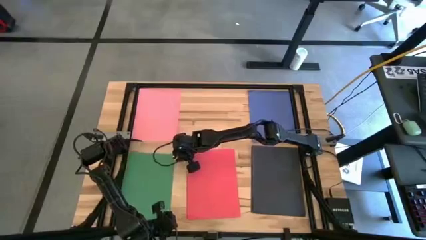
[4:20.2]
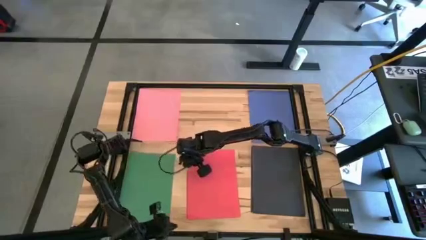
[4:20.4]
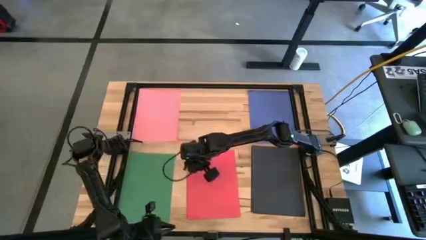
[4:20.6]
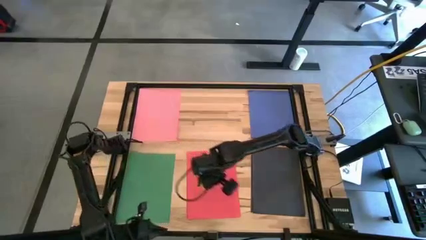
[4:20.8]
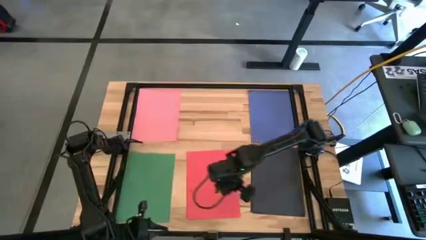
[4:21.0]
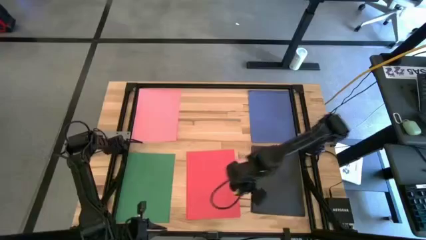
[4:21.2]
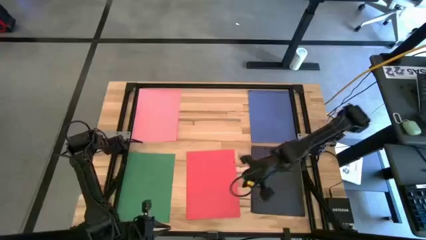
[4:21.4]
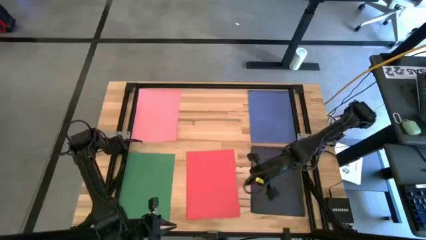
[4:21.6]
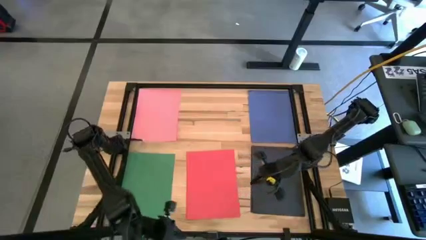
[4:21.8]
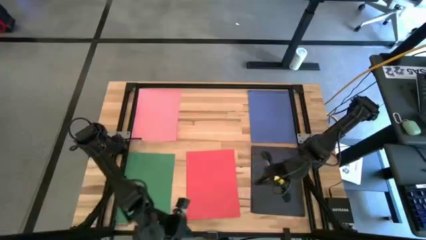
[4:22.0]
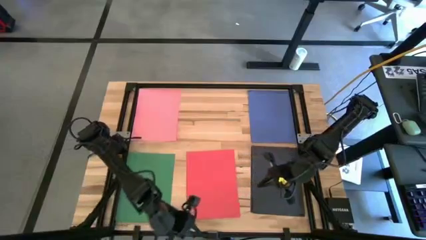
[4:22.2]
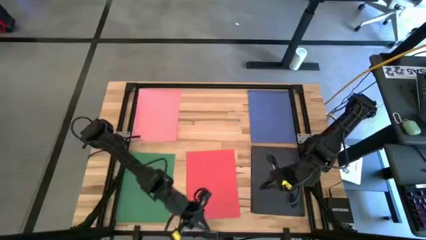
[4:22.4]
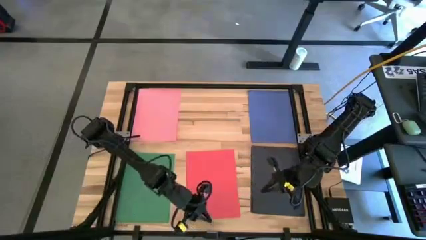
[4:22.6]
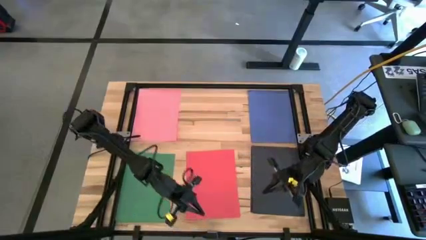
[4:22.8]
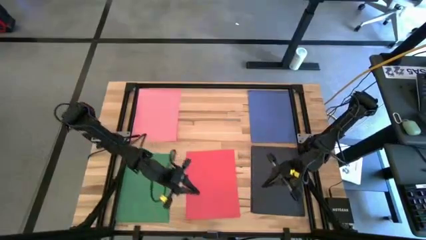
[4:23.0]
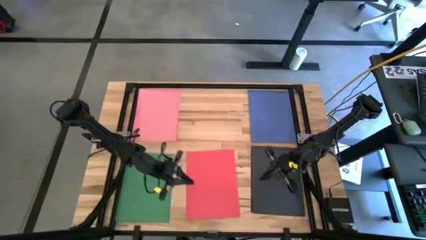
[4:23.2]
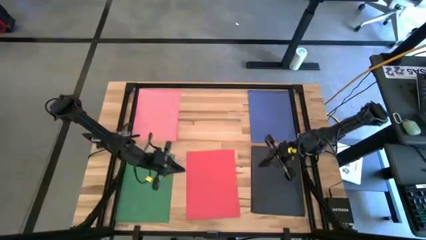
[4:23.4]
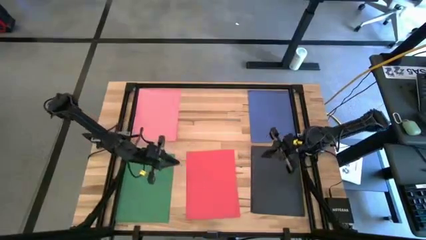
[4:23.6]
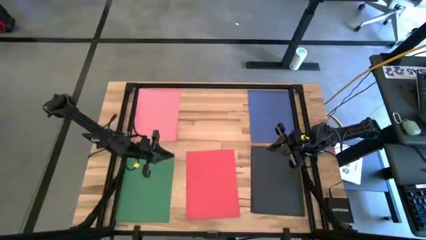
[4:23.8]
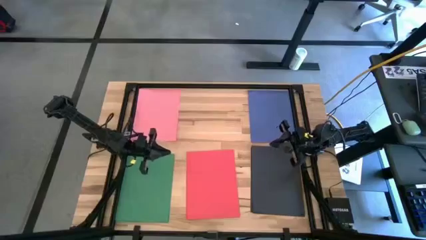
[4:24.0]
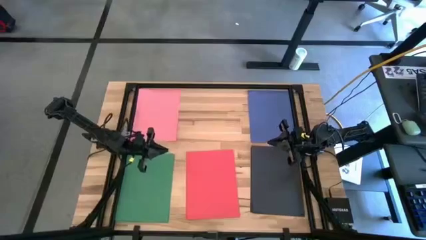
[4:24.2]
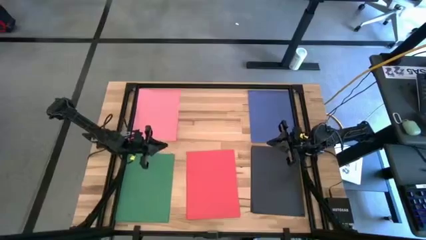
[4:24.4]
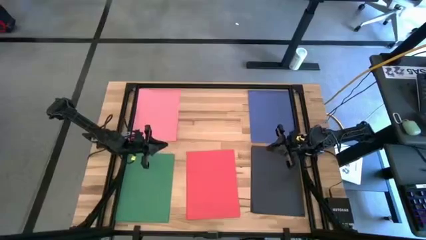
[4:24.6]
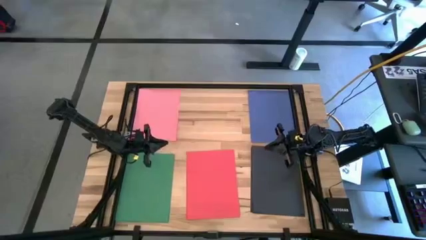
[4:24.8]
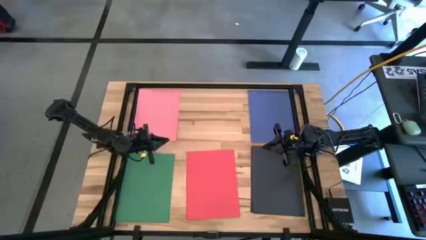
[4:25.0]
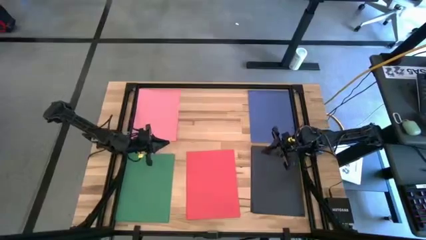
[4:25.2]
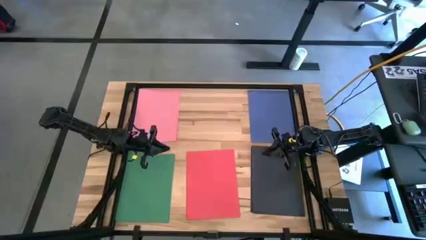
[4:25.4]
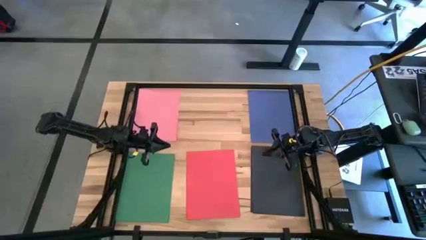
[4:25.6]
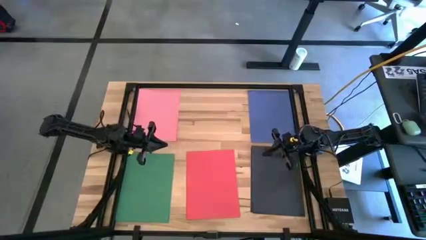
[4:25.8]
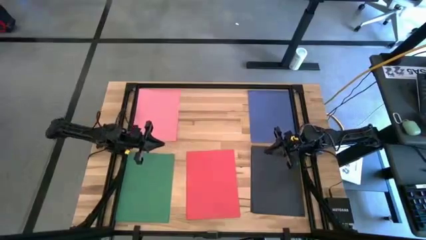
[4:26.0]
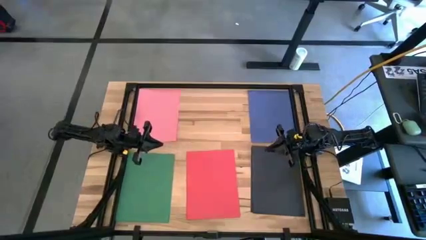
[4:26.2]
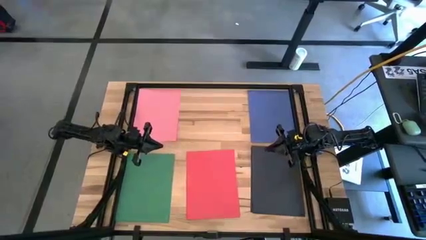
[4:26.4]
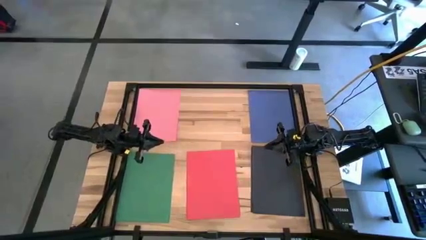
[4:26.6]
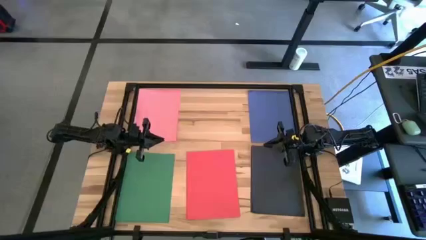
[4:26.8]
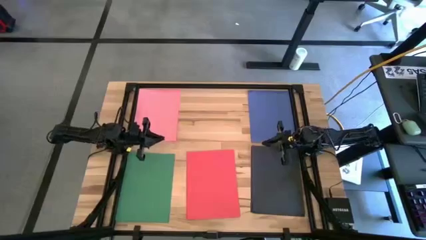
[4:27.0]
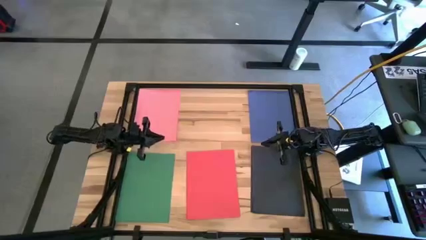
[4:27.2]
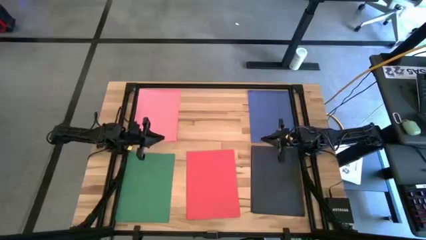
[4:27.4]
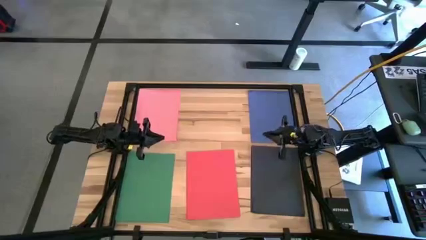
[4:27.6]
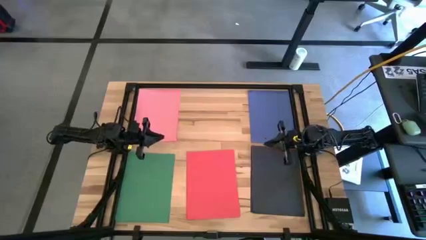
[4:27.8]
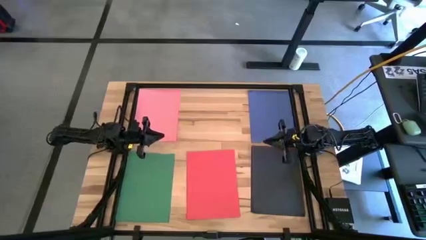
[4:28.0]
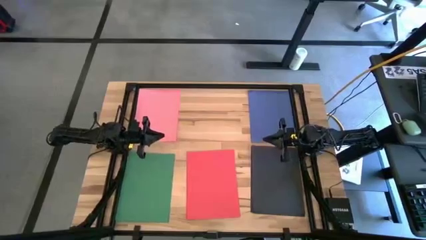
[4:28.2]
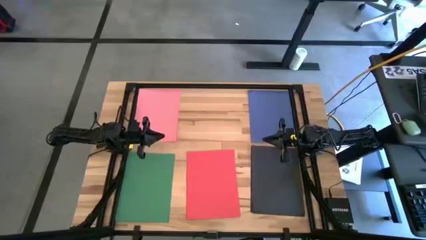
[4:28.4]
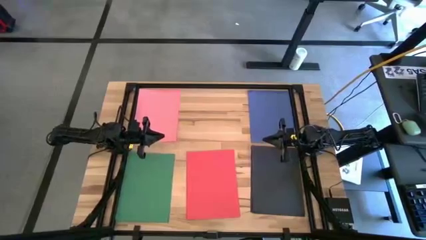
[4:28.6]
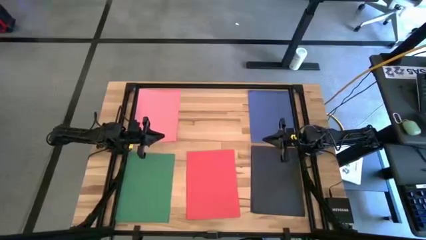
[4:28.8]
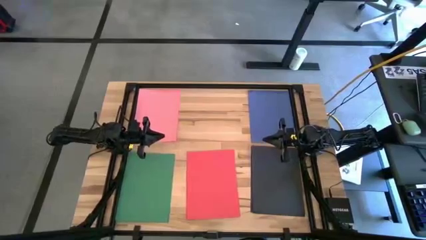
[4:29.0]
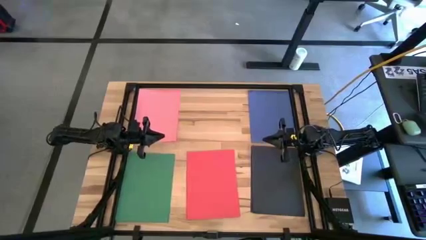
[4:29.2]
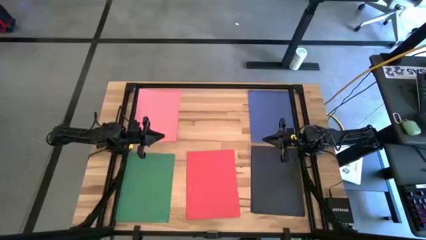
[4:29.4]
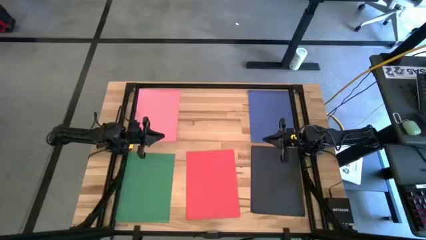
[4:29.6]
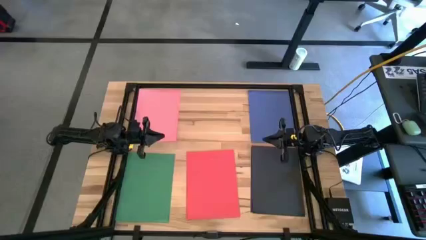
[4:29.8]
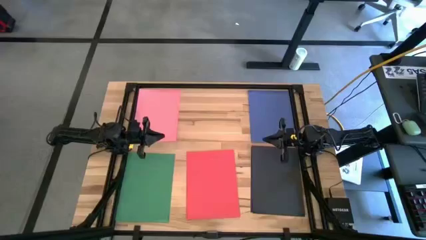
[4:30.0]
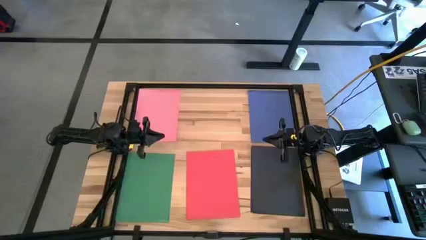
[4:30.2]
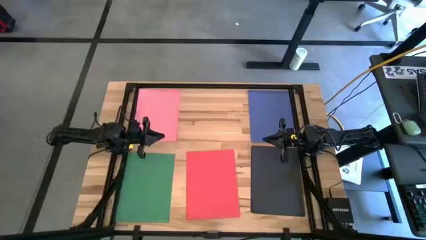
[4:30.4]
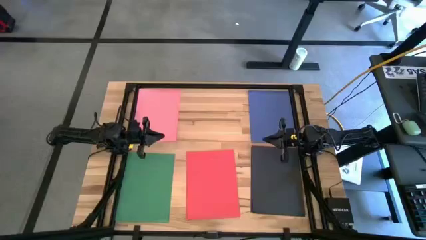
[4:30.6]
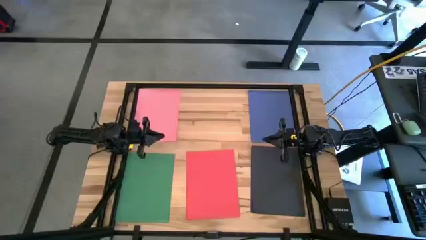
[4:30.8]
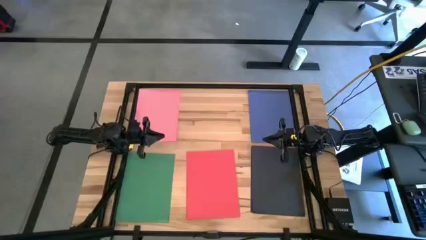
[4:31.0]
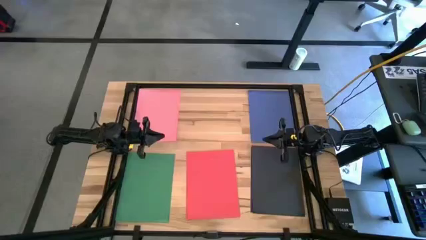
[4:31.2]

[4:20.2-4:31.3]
Task: Organize paper
Return to Home Position

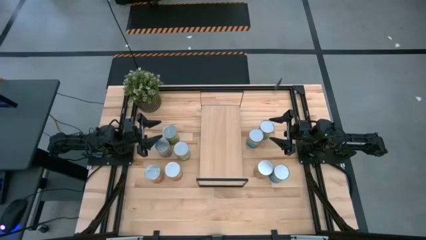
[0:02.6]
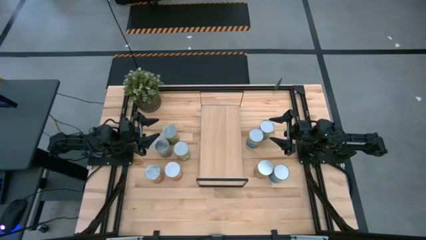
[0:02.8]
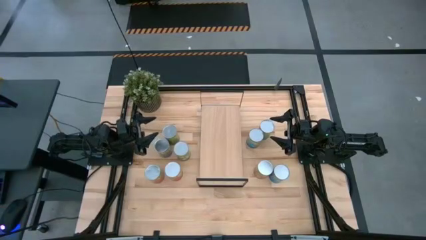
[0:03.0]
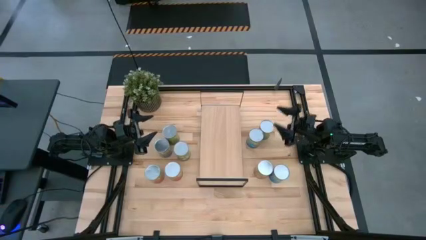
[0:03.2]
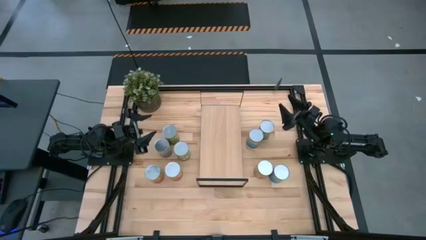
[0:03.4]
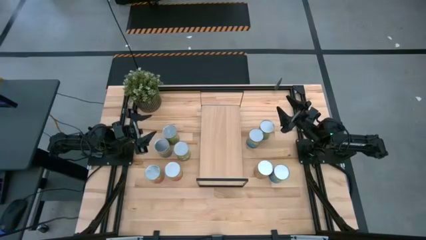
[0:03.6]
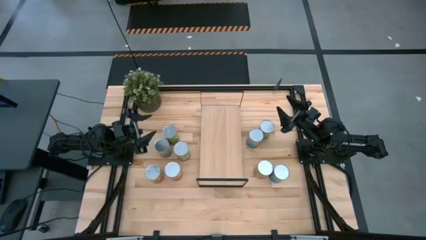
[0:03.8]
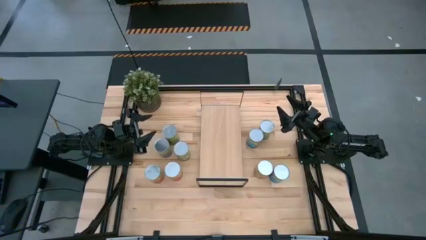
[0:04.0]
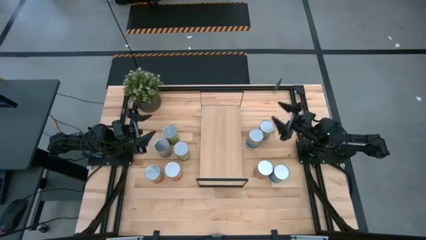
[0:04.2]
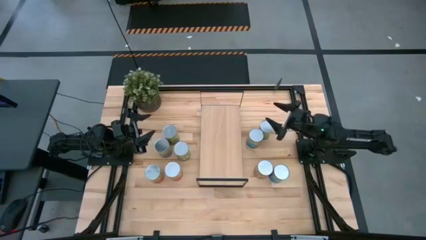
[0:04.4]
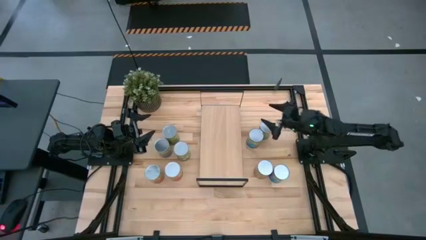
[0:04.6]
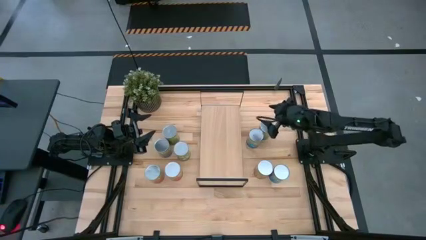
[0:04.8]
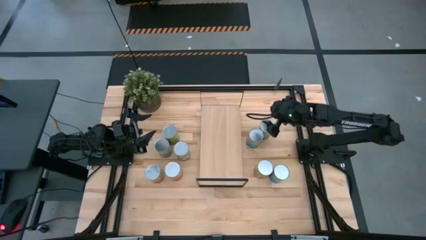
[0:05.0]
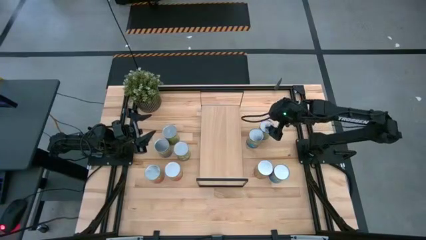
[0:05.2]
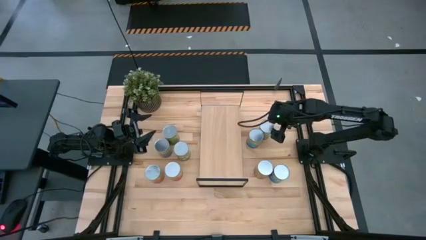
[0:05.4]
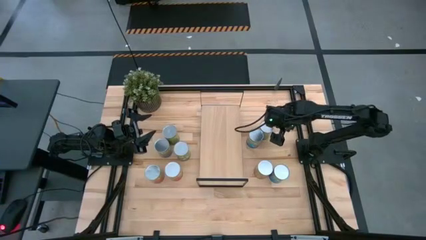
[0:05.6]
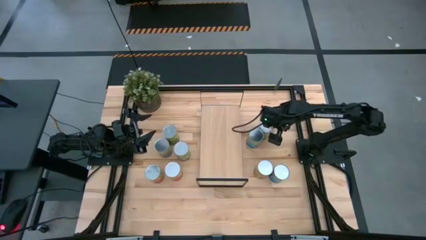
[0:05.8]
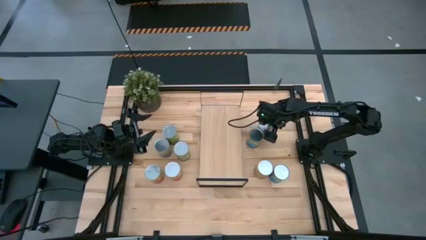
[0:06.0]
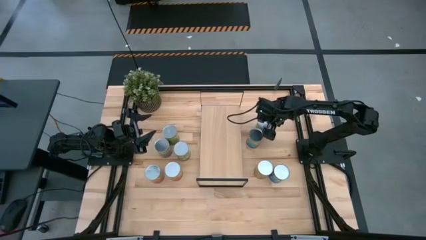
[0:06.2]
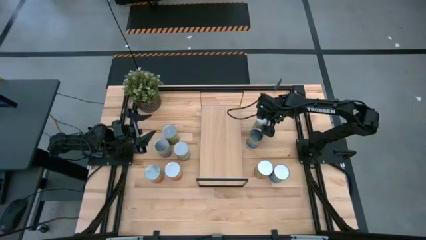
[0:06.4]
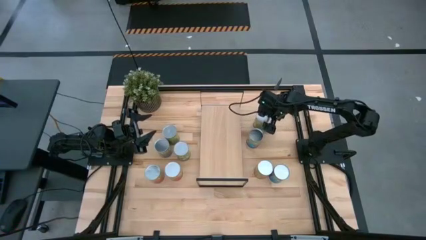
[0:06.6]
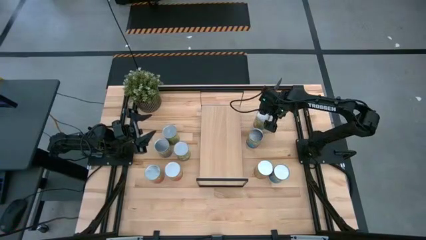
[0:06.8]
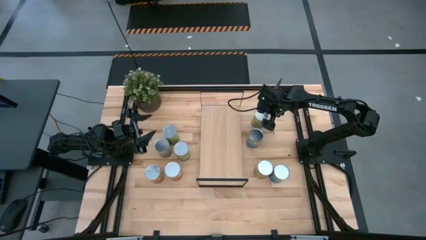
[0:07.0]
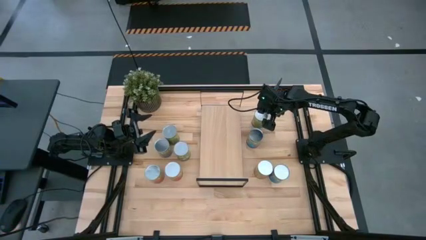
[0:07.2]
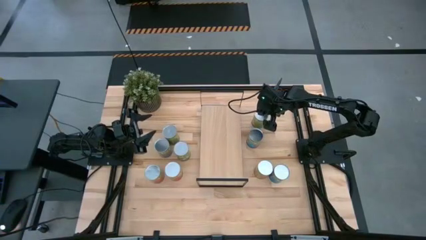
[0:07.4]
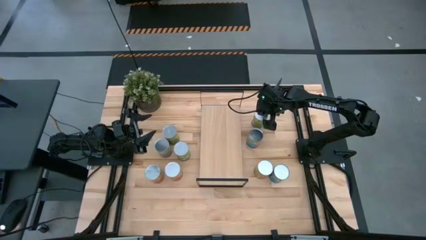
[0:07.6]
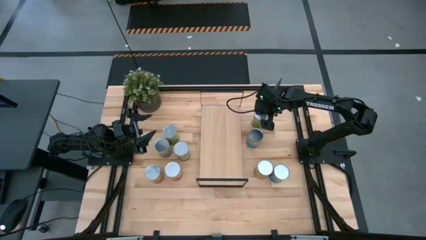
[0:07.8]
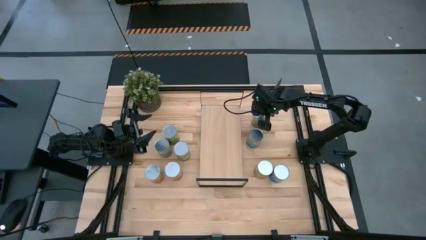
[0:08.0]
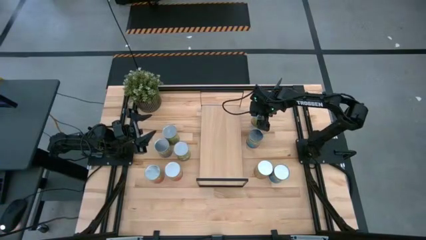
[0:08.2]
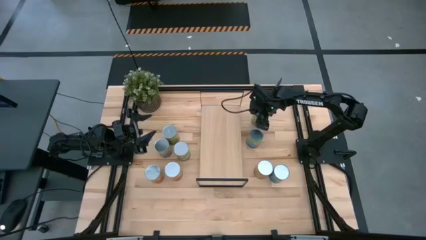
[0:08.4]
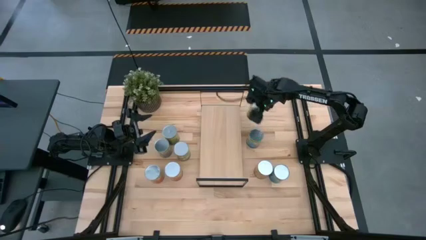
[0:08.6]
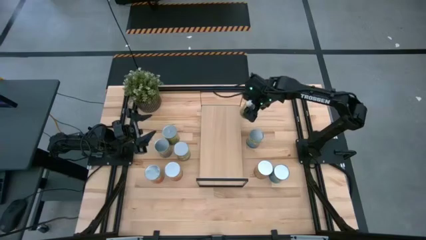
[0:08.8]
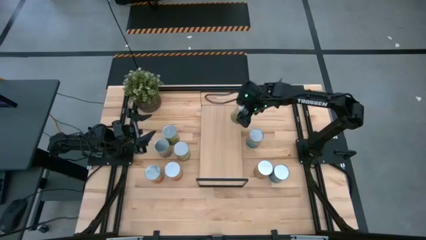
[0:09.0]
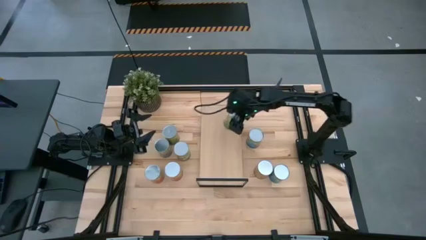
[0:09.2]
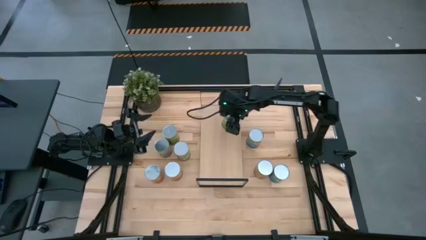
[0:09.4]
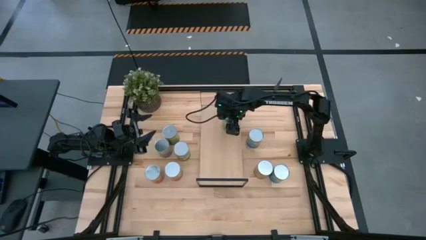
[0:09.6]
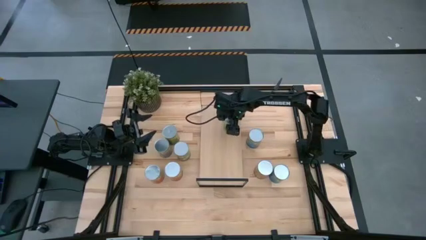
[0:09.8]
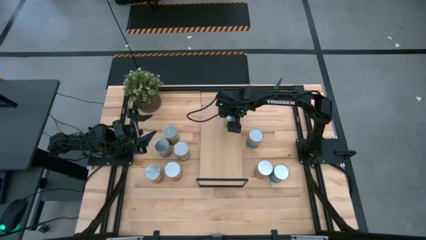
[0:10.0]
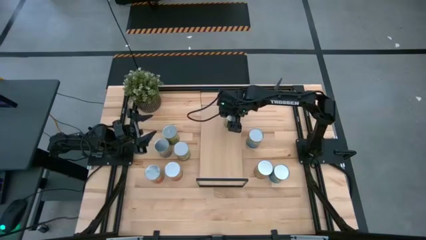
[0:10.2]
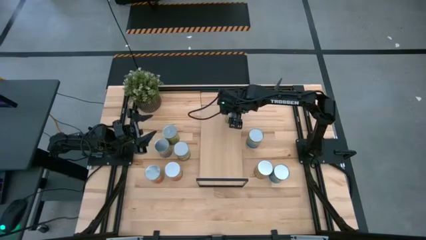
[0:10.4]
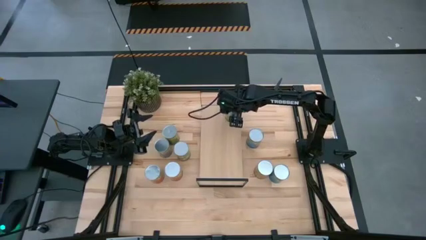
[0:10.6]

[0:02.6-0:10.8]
Task: Pick and place cans onto a shelf
Put the right canned oranges on the shelf
